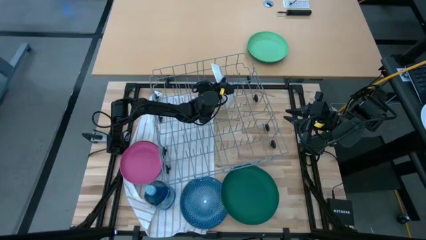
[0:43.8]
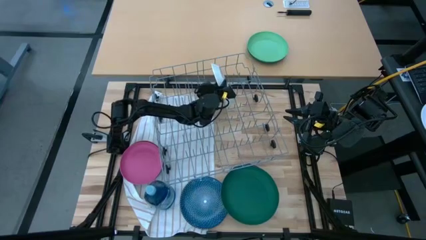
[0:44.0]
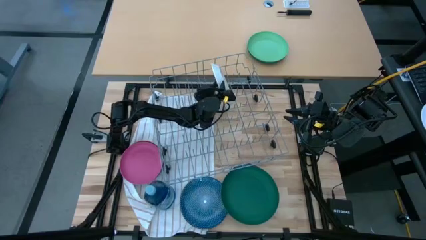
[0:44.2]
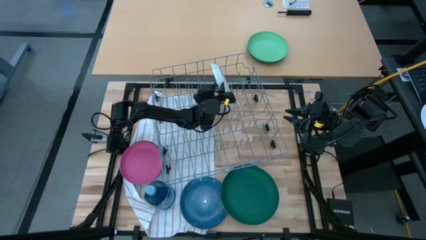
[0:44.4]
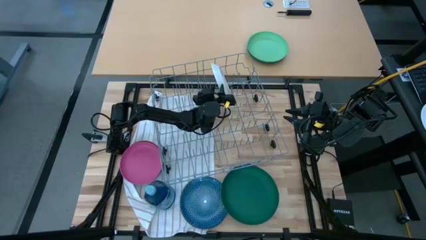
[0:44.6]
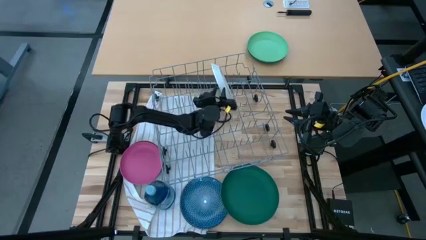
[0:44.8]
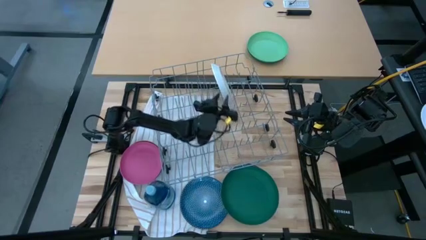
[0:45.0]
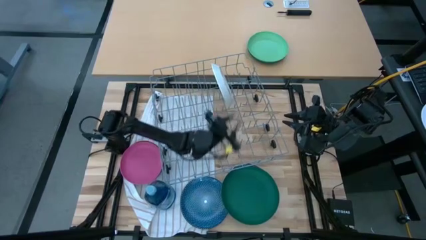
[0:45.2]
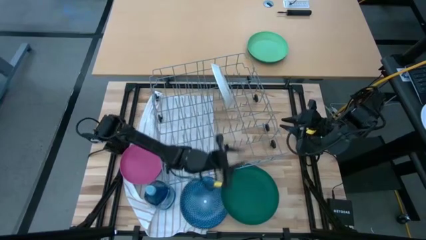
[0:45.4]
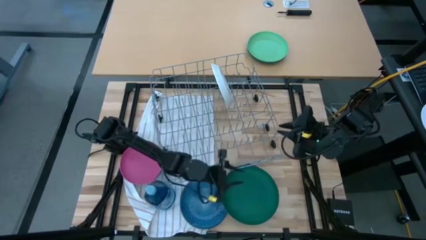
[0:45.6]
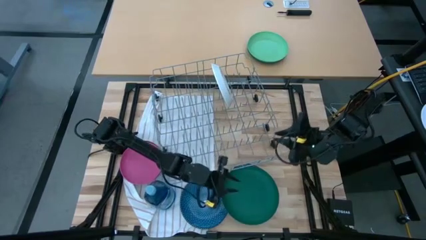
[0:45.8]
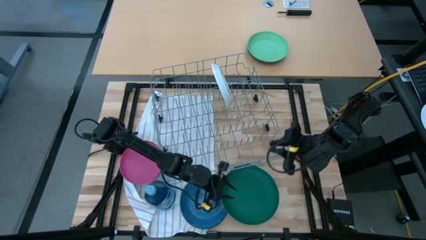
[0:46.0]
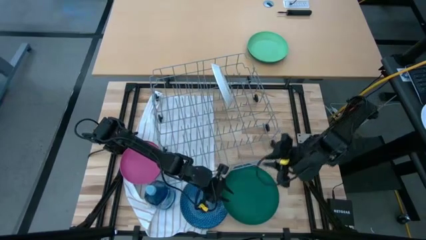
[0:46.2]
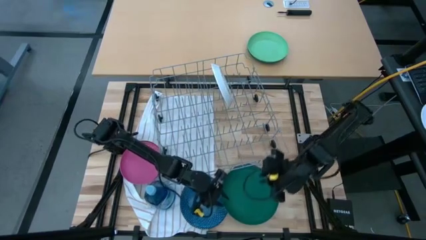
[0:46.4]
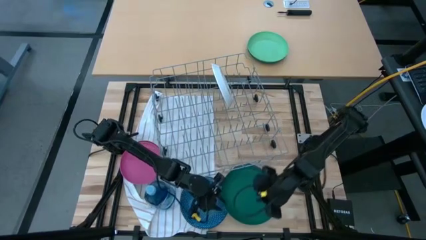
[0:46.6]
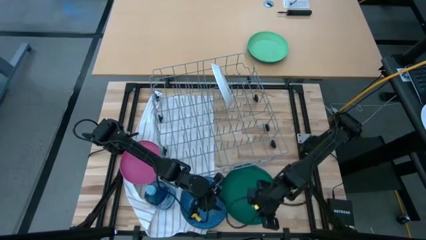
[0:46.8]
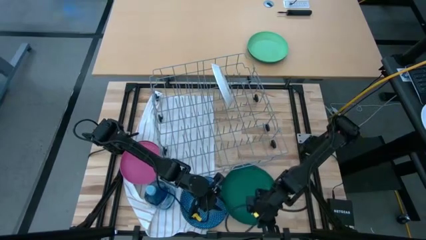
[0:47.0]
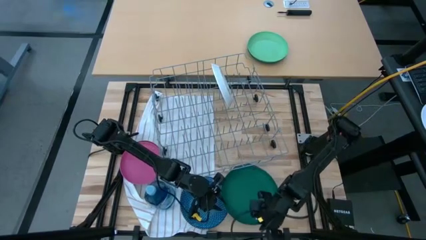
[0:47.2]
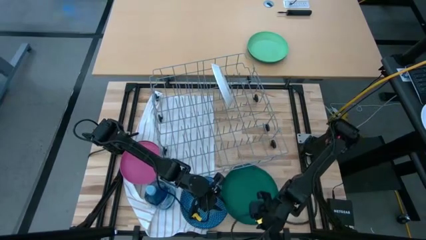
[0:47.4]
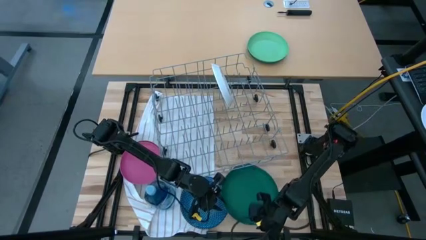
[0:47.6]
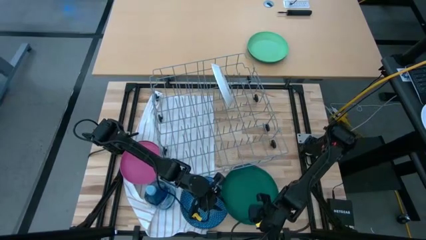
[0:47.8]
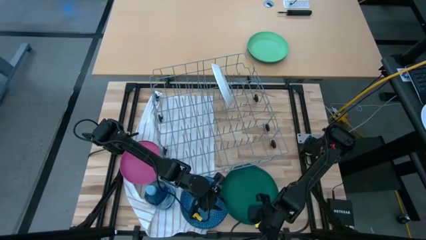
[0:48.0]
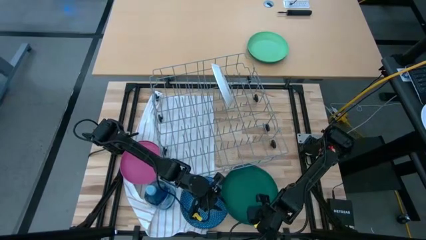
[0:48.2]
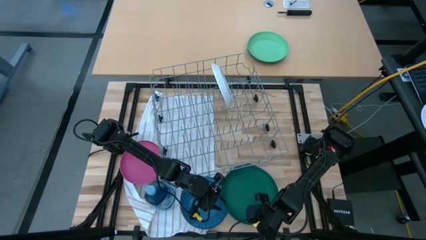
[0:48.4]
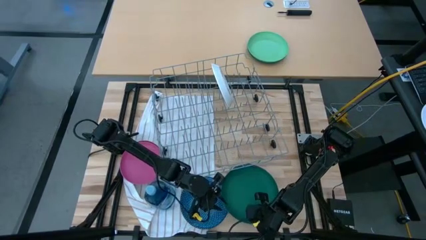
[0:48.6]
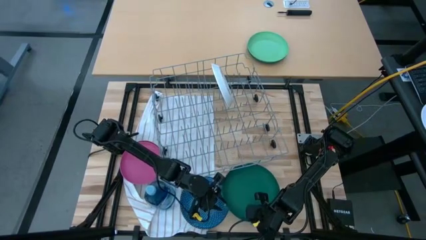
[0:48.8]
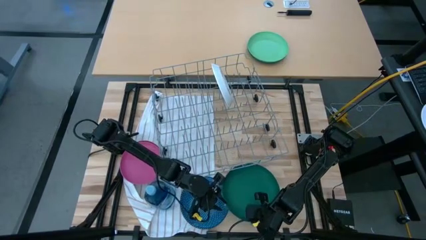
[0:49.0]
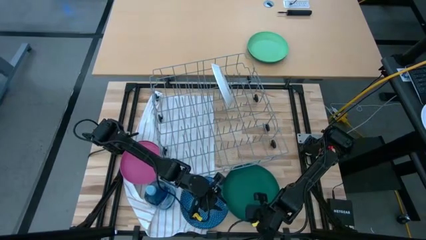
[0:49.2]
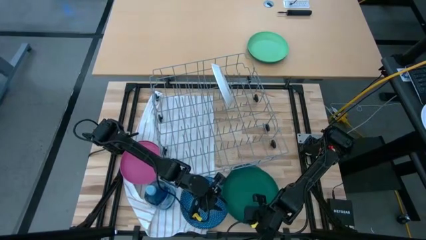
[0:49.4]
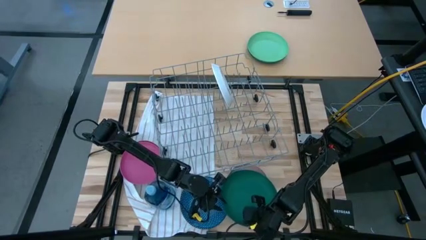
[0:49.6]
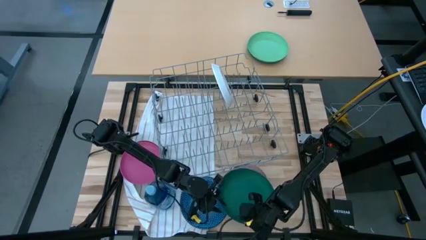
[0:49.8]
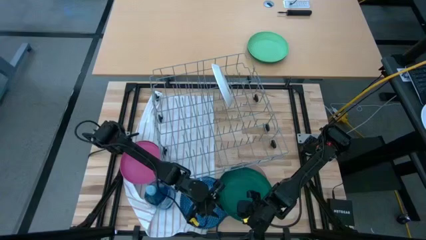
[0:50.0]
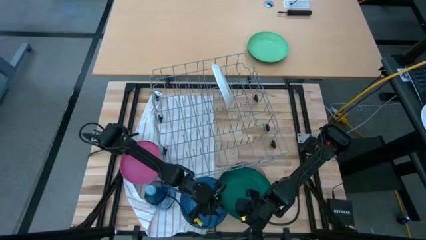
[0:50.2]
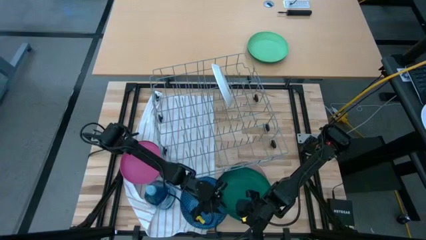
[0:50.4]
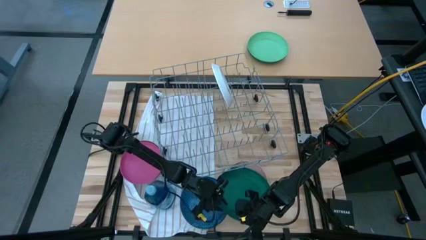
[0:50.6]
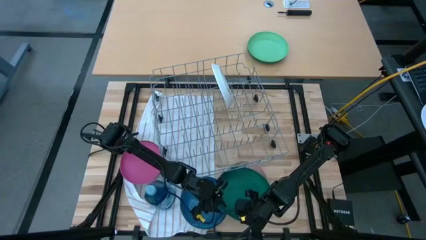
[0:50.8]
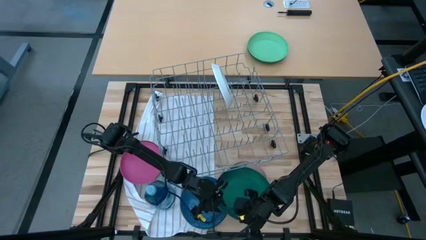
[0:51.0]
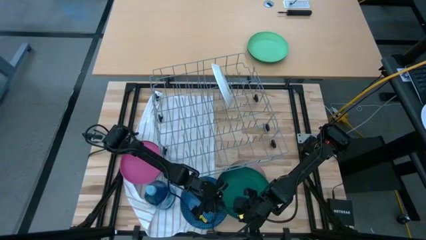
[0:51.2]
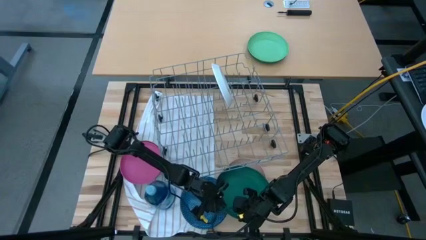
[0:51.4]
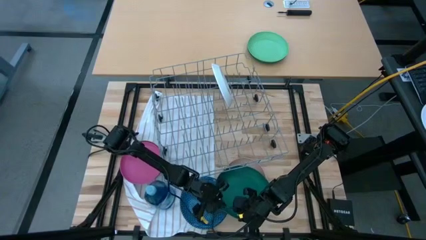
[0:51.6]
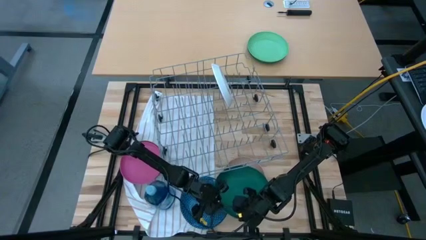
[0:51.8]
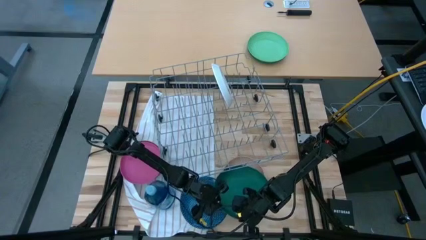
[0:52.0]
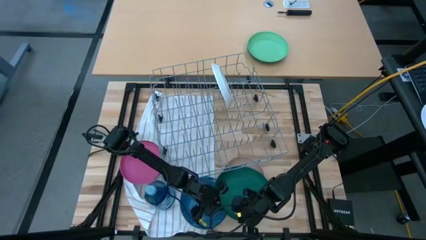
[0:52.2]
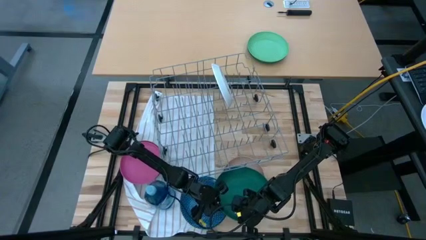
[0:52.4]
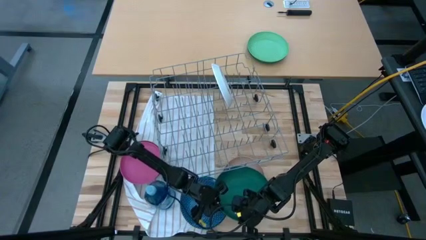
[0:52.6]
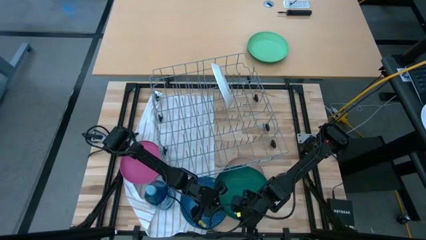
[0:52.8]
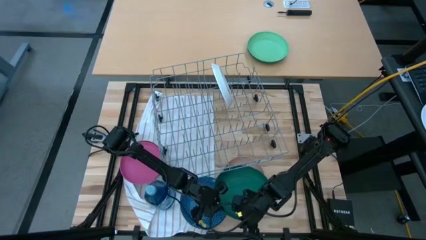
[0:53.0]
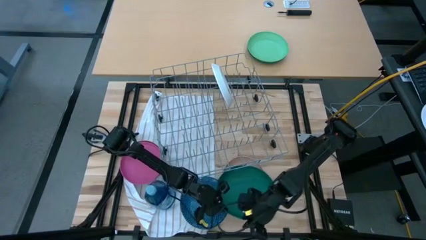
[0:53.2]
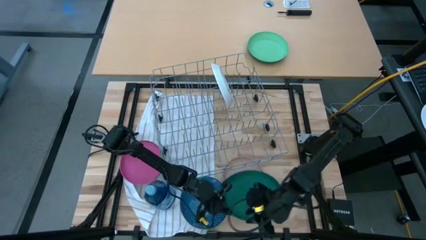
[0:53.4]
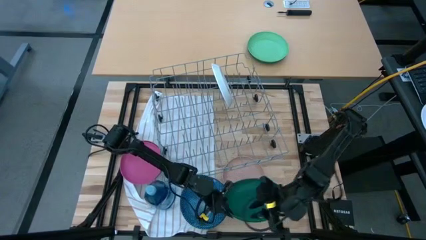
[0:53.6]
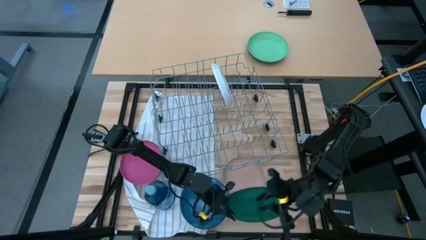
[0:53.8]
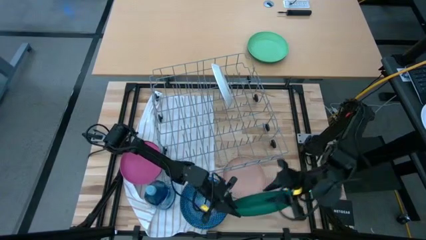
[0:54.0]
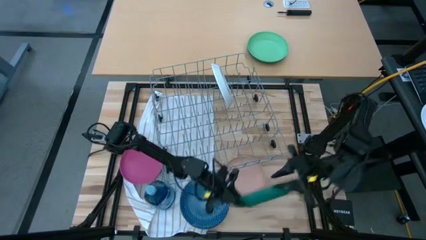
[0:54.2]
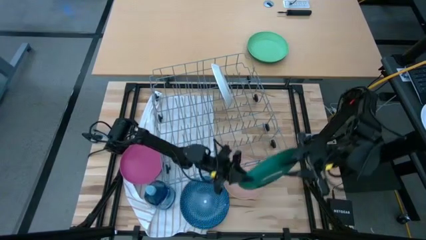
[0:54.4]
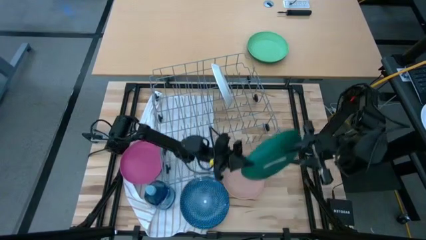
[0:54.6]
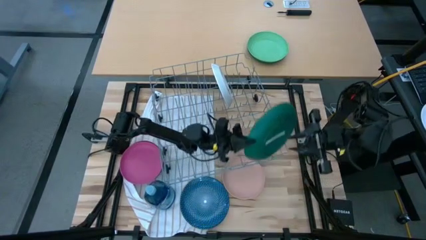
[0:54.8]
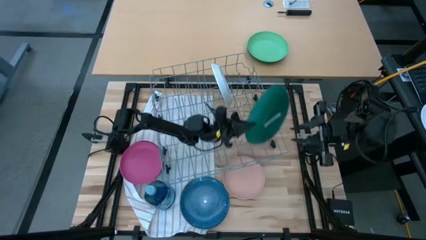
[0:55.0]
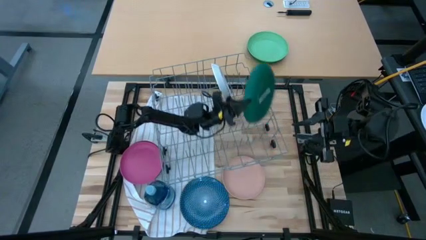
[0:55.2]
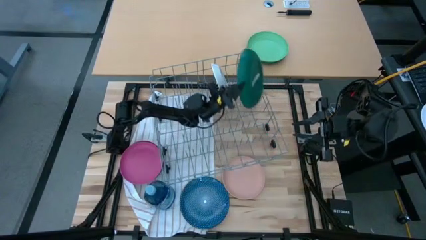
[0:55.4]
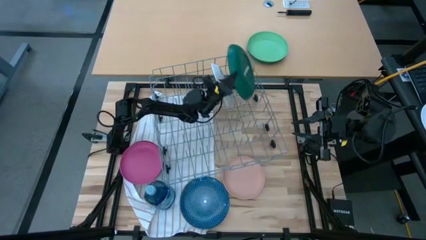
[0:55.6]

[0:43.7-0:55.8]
Task: Sort dishes
Put the green plate into the dish rack
